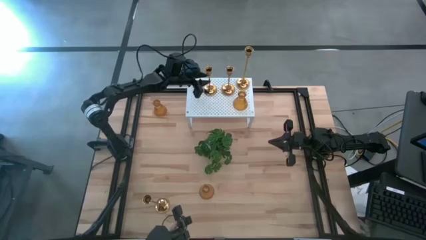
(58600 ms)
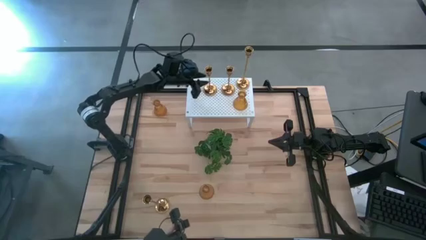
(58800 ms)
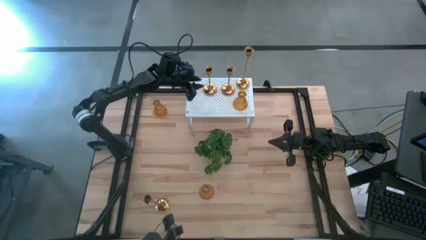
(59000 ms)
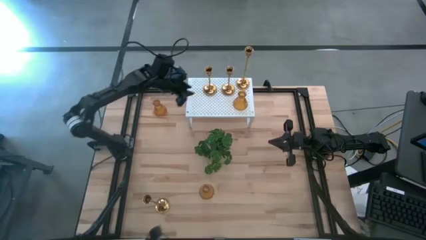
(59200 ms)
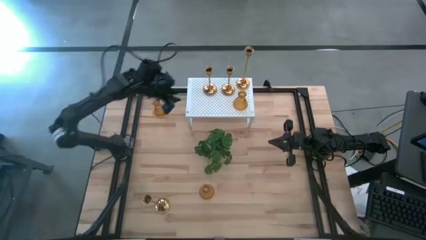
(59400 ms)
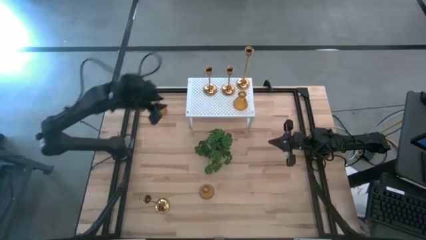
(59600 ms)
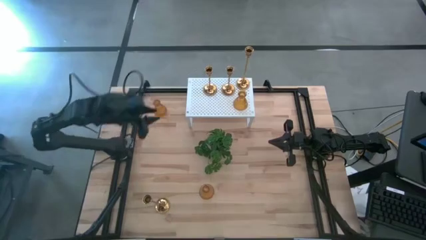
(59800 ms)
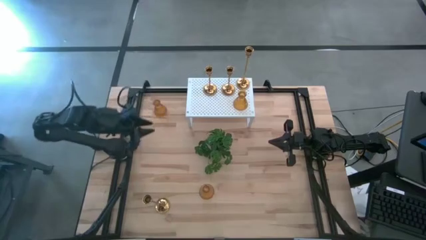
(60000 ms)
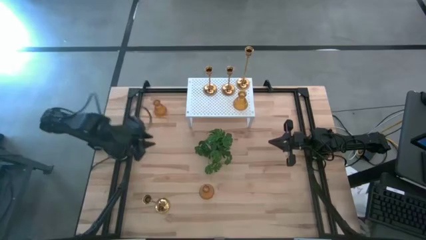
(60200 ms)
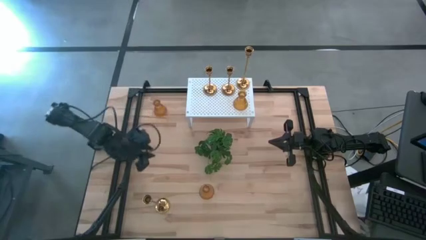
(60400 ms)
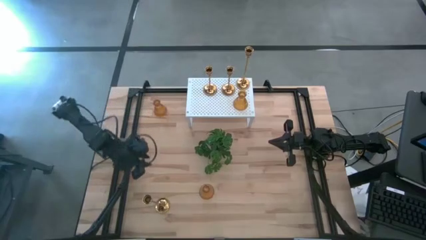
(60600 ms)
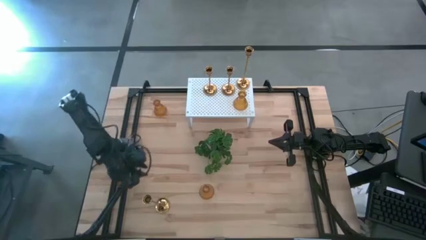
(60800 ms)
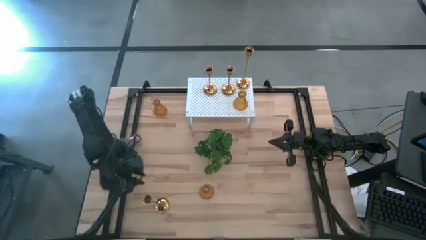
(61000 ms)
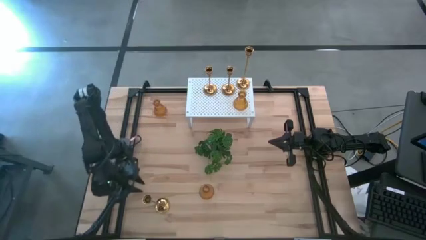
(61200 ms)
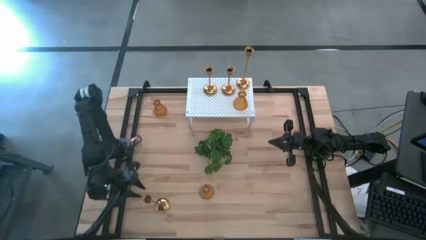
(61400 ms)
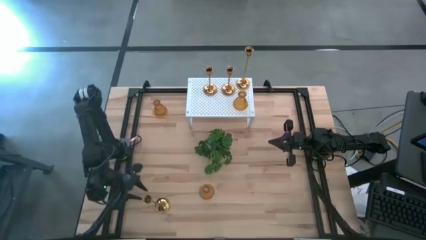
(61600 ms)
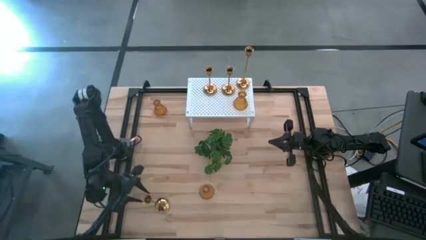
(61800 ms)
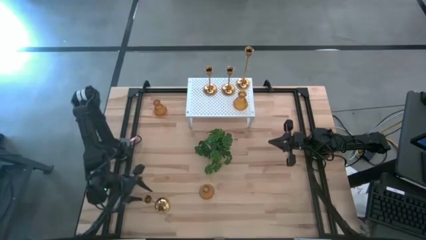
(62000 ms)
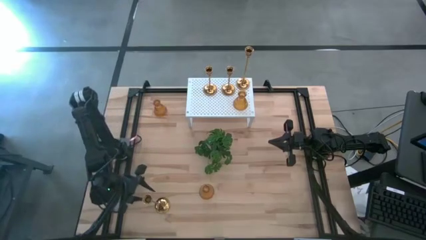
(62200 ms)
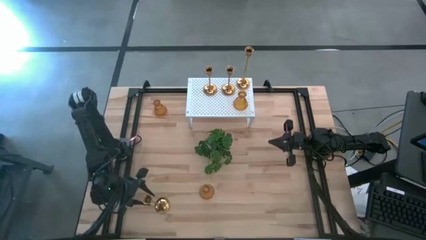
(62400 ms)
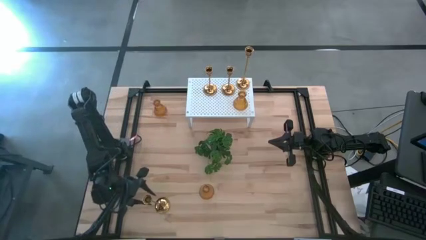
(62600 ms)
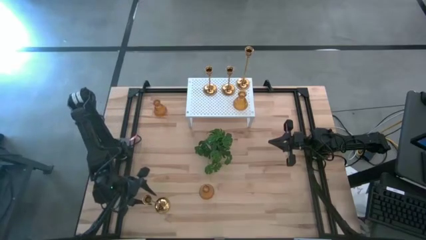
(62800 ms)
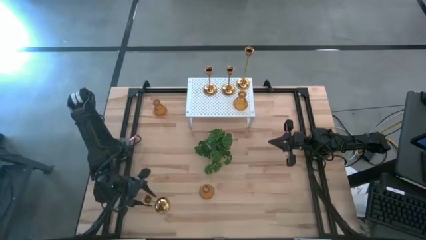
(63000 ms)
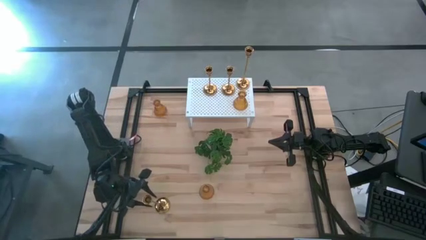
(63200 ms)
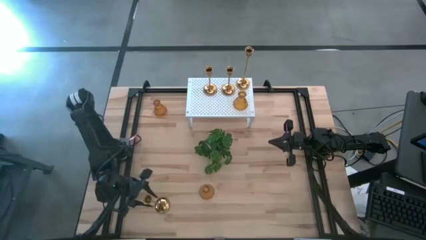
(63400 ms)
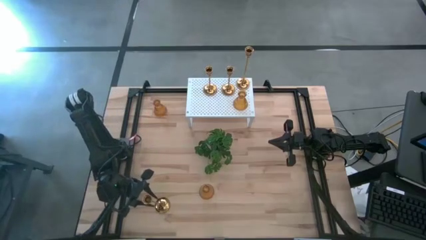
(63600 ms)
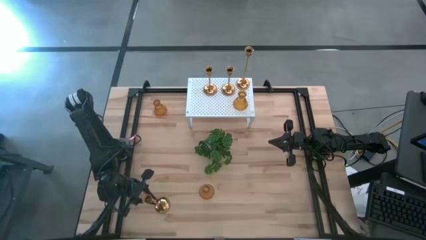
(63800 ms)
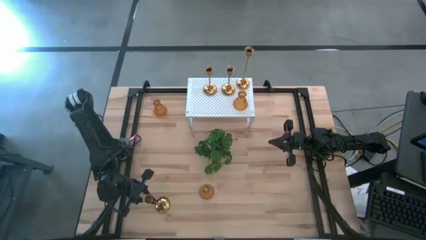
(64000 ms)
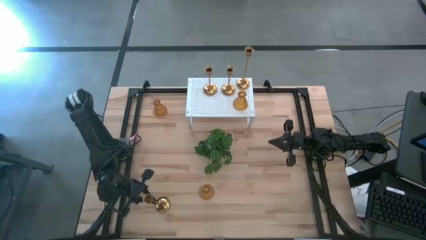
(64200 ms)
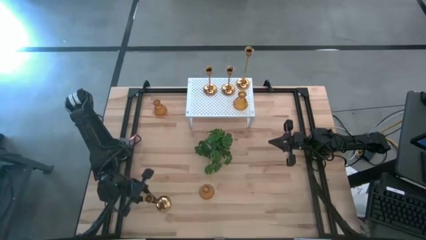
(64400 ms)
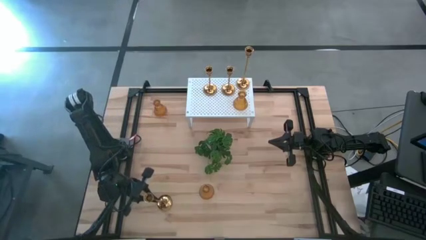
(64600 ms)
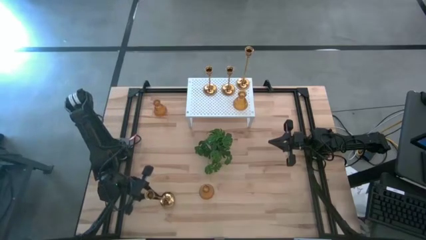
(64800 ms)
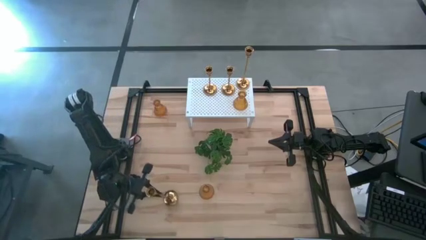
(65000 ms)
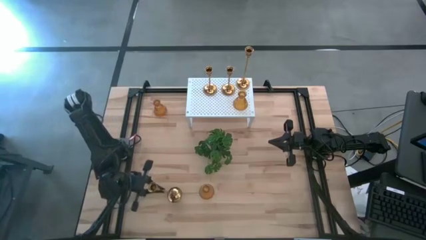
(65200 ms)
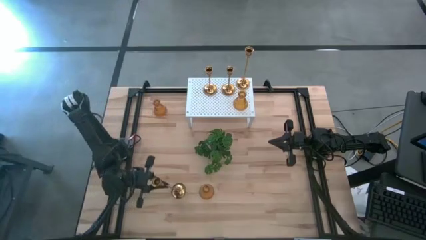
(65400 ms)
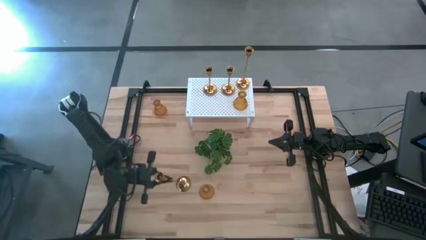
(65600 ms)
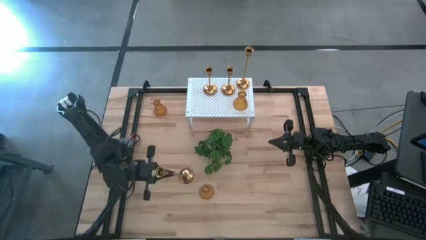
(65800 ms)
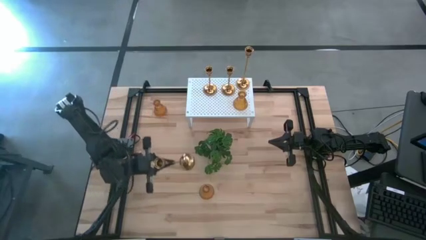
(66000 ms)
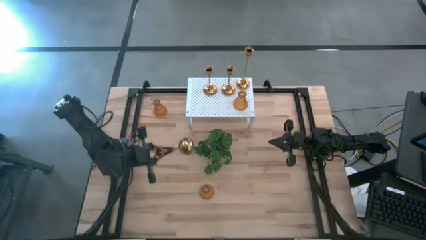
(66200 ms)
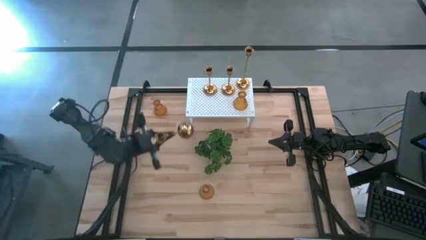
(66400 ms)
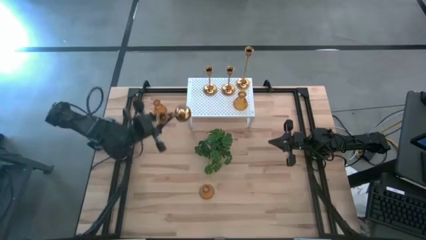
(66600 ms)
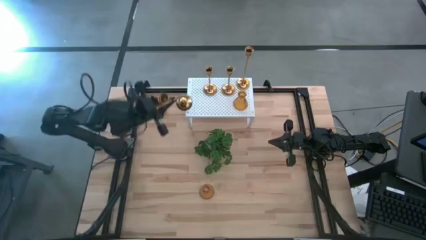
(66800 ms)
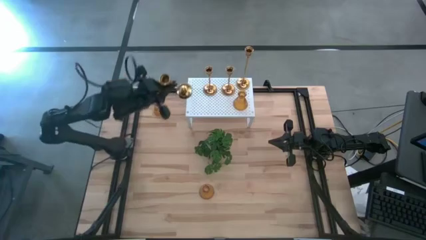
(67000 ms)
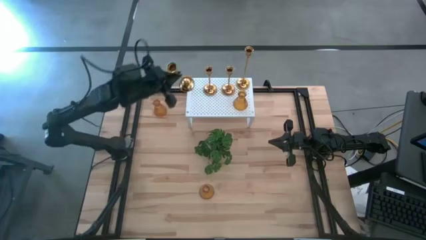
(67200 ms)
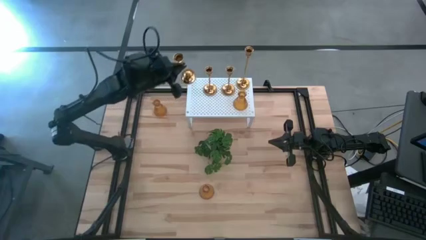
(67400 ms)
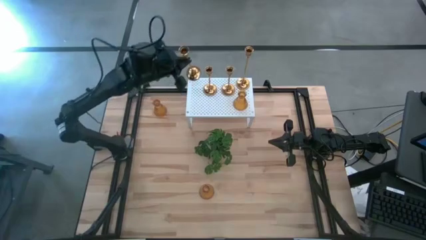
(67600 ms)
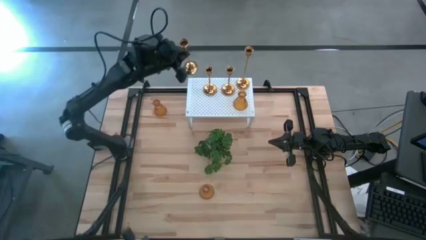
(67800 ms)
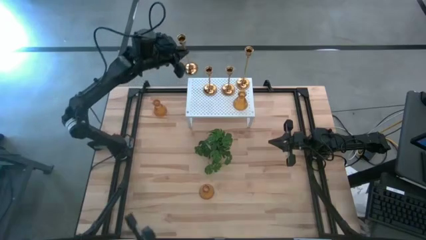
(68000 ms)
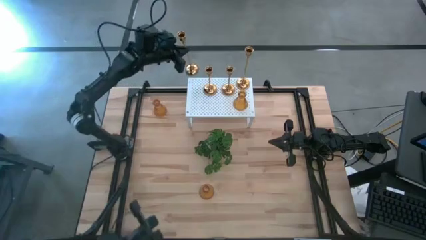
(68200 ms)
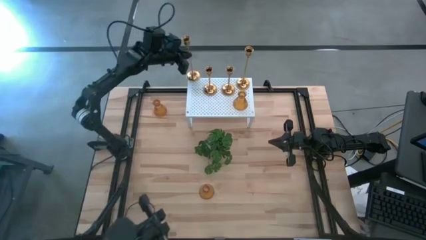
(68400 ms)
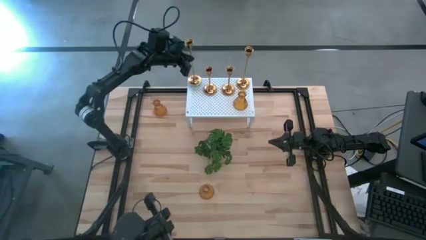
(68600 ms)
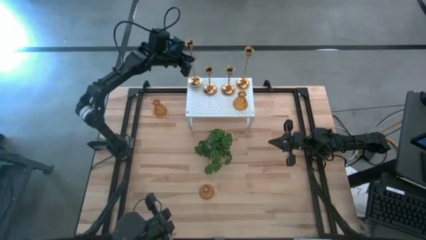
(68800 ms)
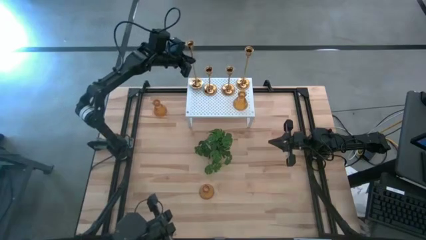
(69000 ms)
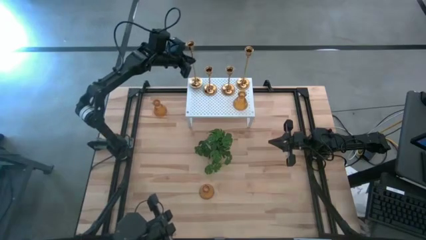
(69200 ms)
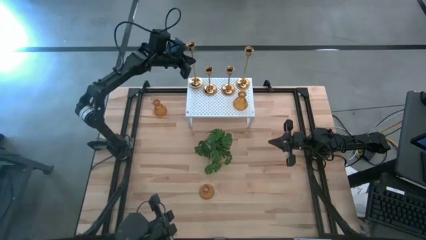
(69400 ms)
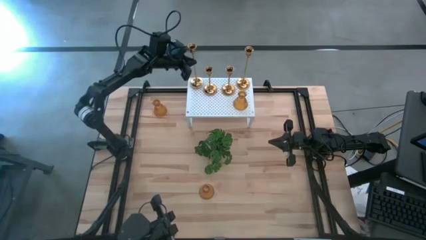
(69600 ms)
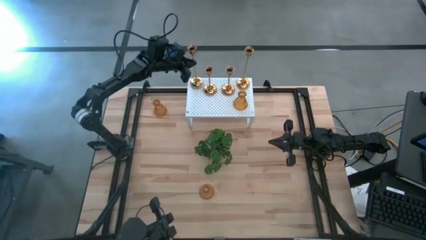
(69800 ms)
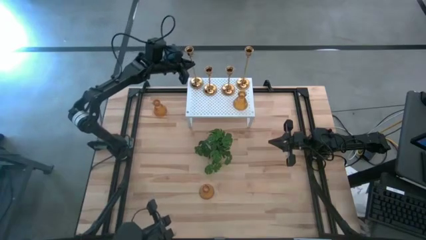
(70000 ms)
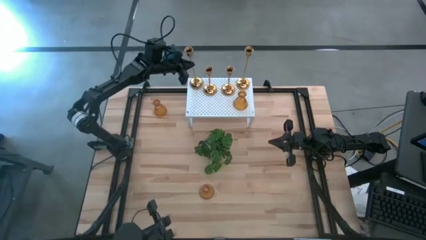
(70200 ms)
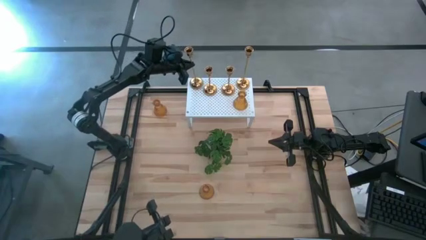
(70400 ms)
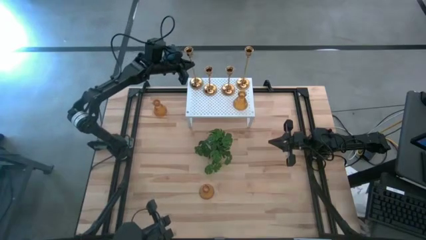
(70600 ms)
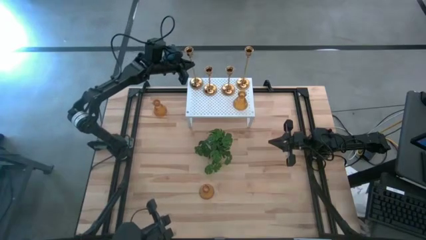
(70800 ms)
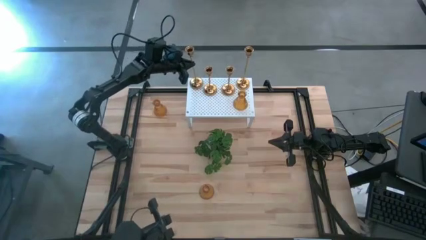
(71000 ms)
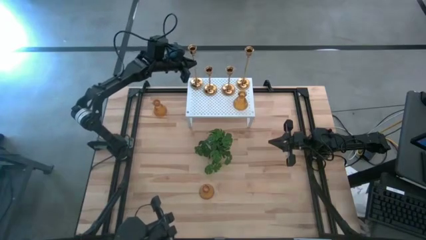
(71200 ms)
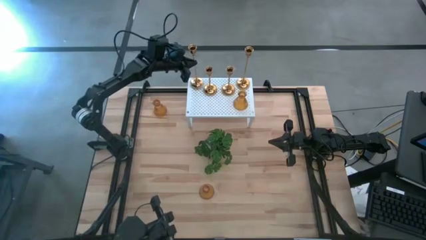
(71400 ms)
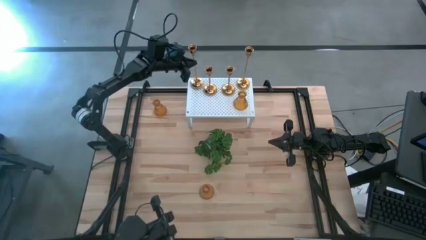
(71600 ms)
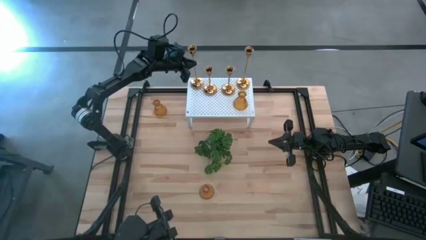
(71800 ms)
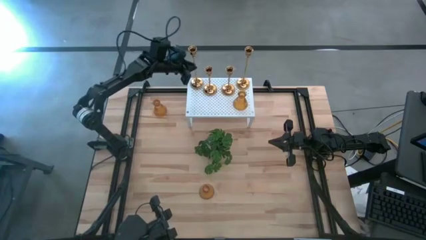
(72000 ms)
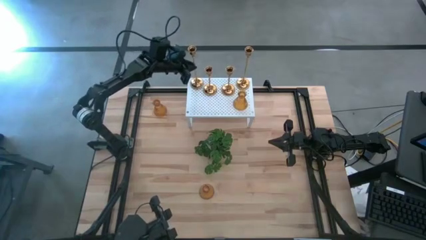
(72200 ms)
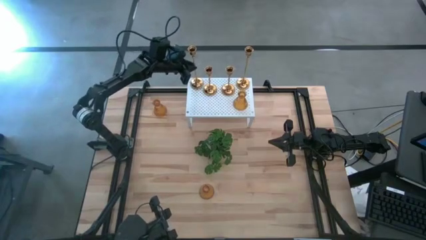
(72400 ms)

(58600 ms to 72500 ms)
Task: Pick & Place candle stick holders
Put the big gold candle holder on the shelf
